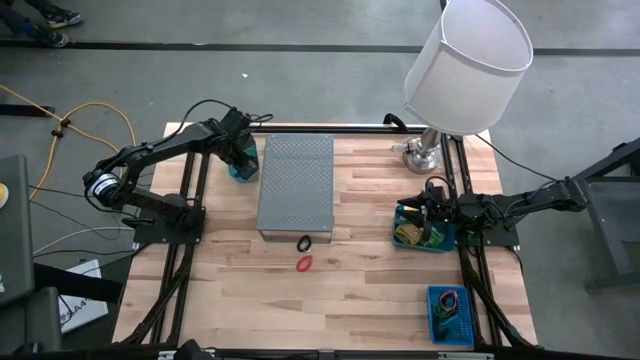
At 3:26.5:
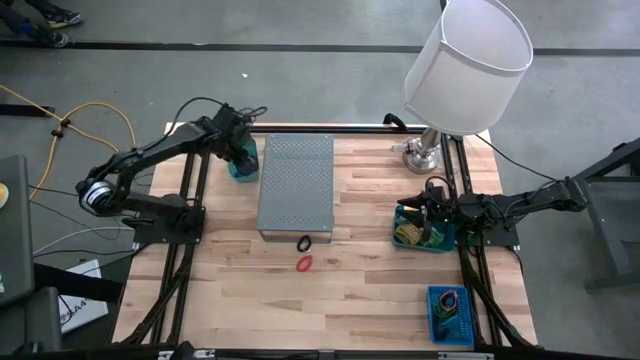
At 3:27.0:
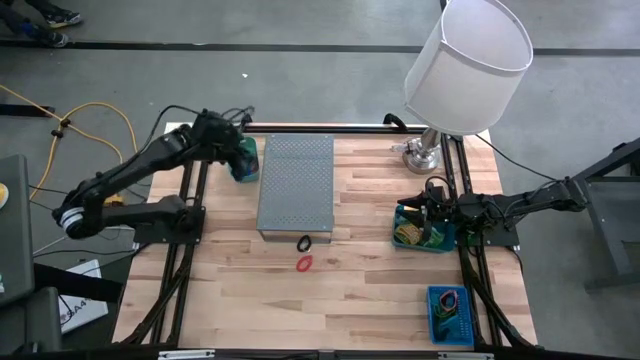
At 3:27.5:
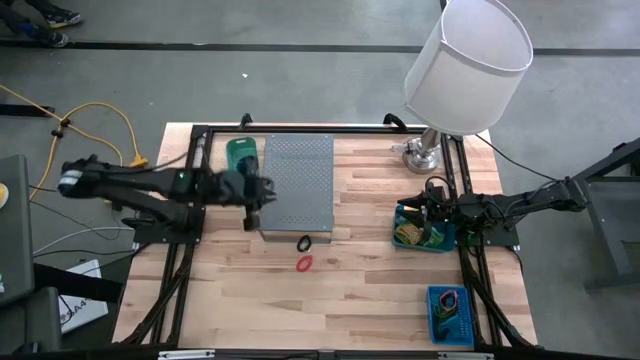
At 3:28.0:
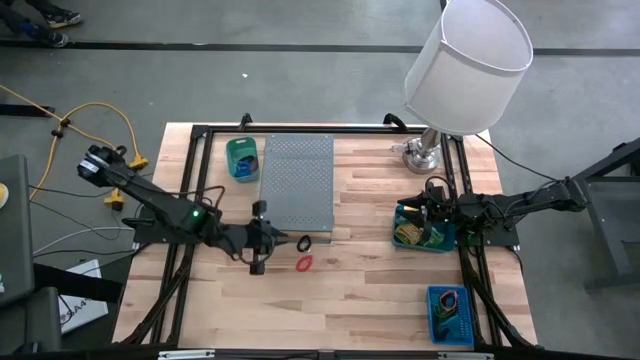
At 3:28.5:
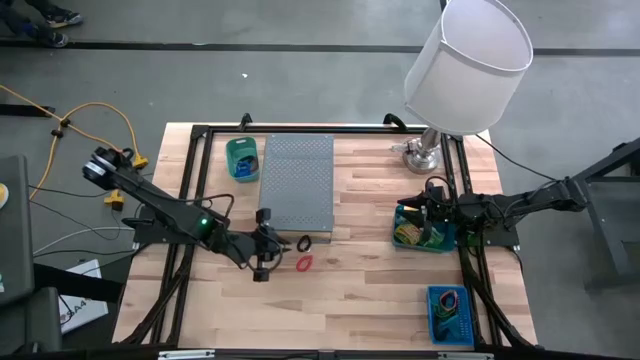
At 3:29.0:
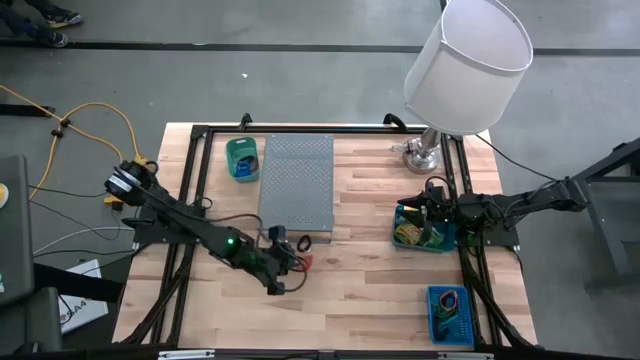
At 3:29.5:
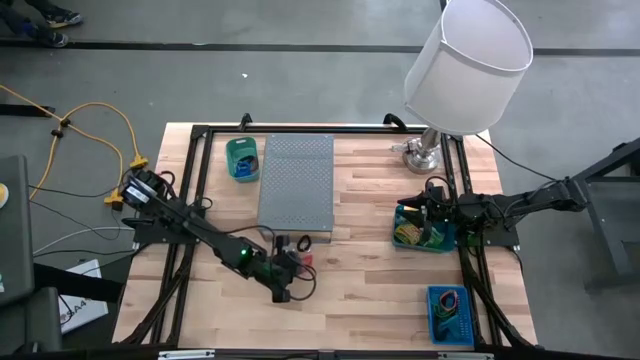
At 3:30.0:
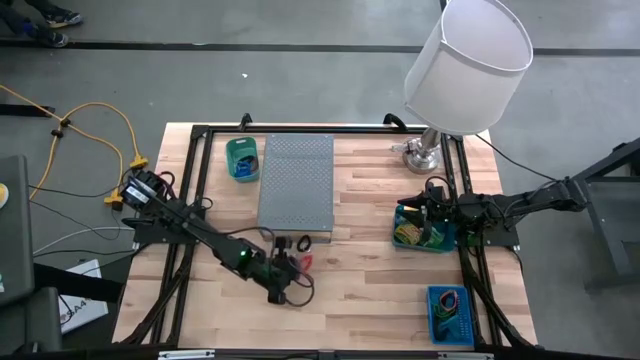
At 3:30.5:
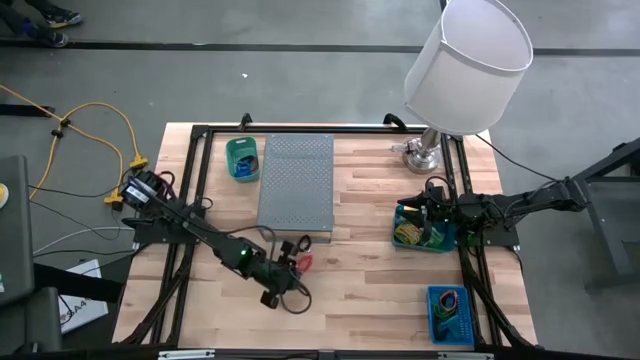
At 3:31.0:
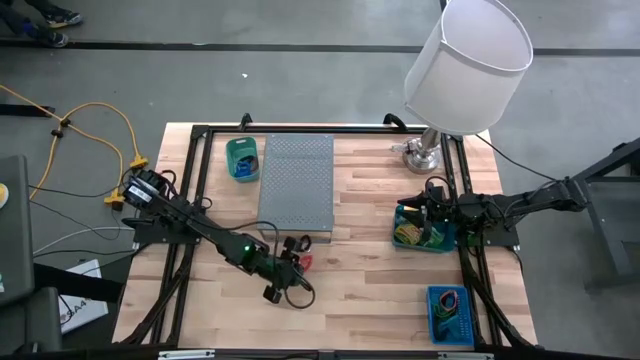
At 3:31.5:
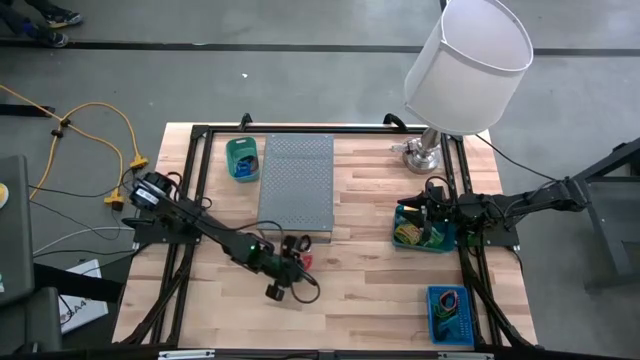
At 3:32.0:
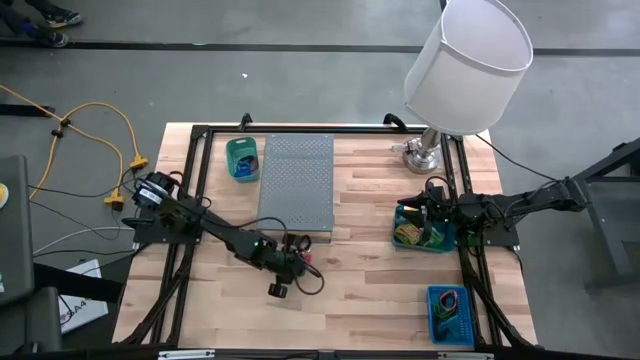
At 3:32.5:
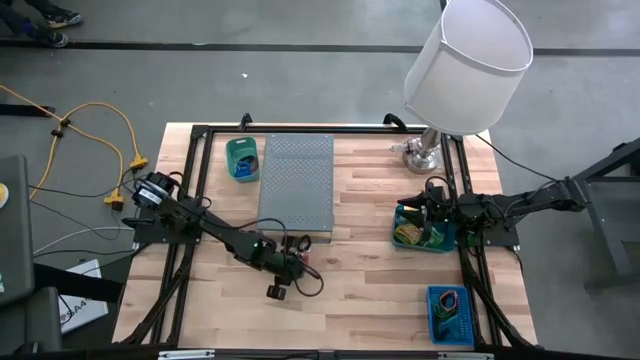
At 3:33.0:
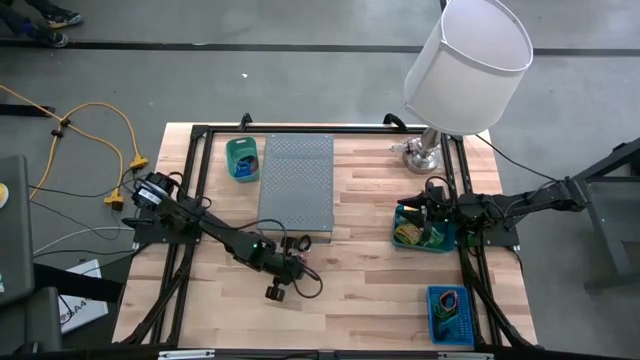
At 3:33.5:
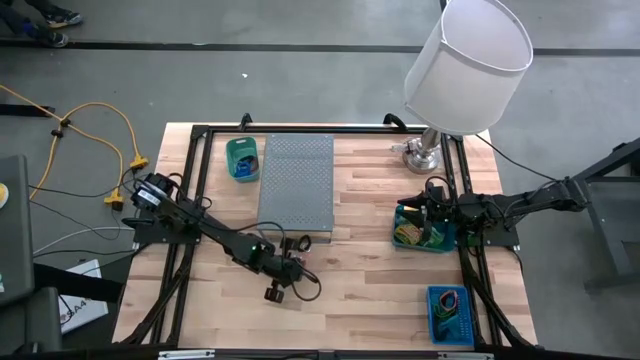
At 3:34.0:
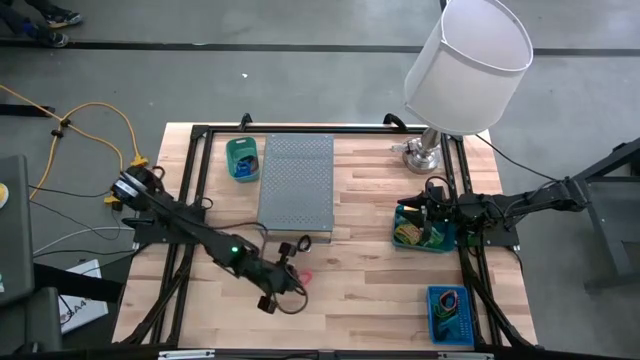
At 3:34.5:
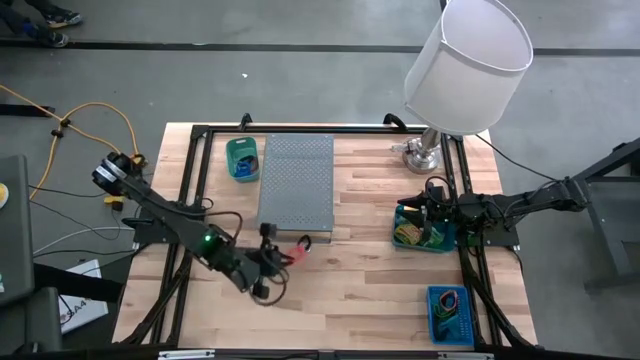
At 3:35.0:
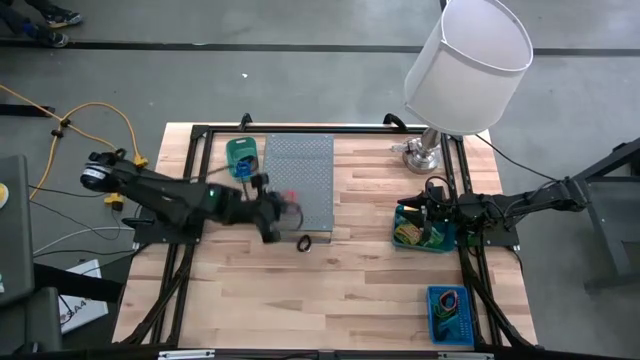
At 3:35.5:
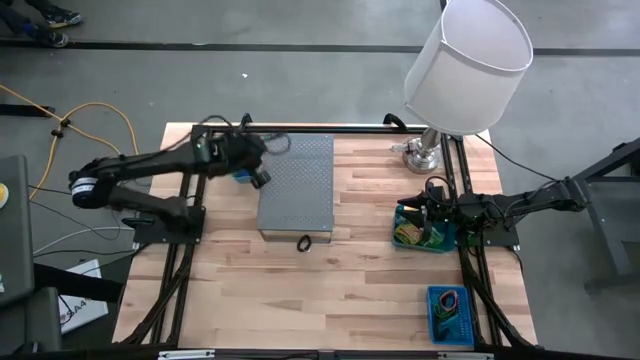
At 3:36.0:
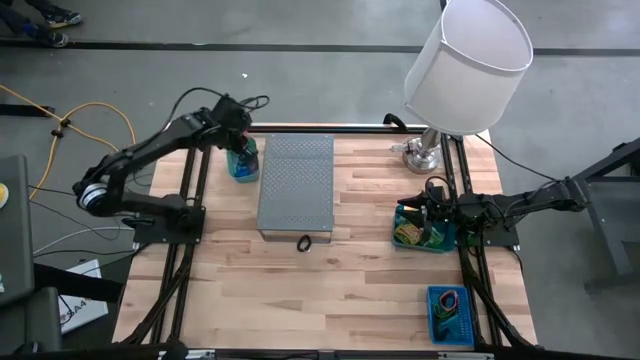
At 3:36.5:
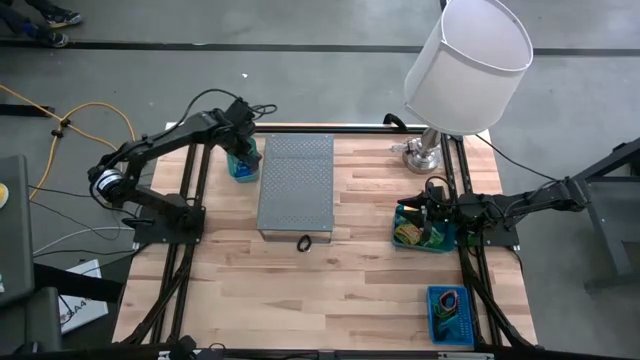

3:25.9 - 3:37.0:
Task: Pick & Place Office Desk Supplies
Put the orange spring keychain into the dark green bin

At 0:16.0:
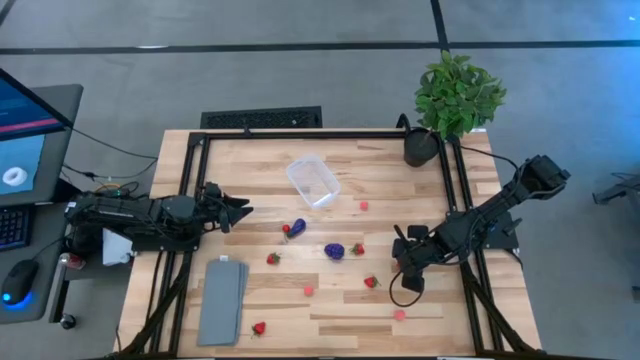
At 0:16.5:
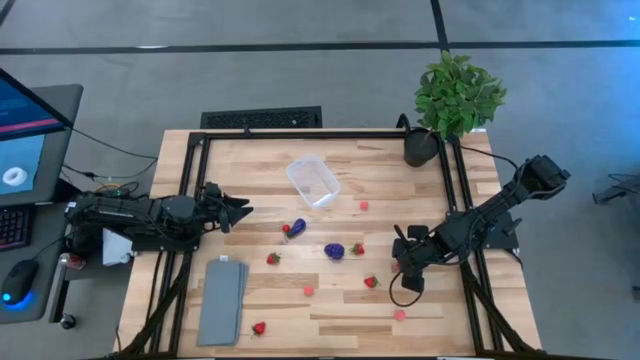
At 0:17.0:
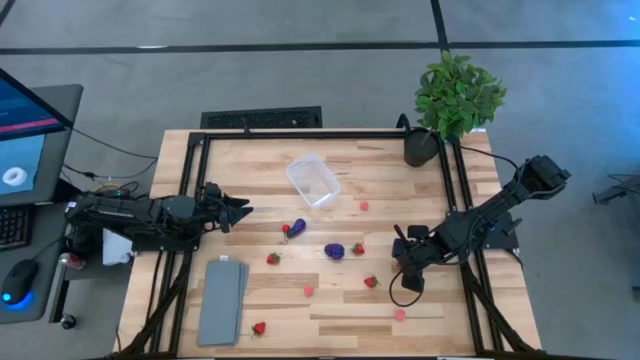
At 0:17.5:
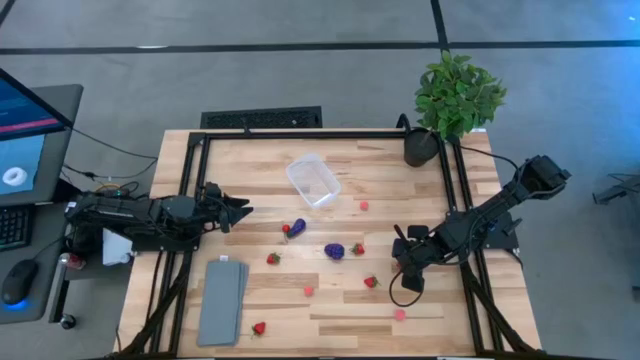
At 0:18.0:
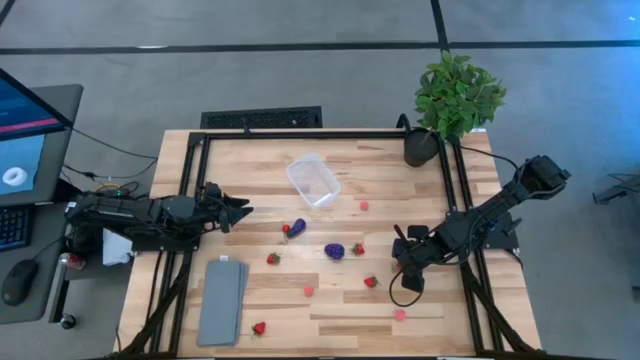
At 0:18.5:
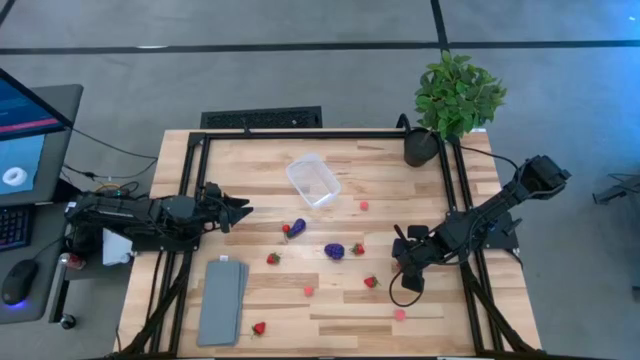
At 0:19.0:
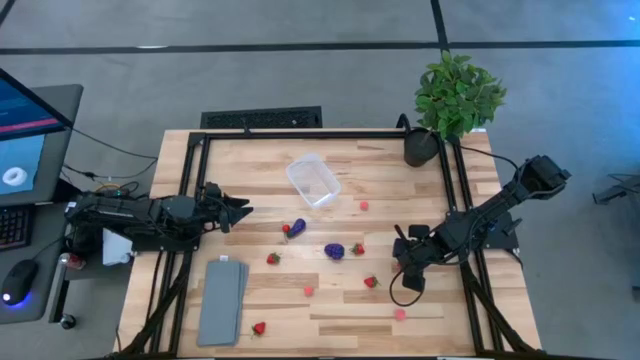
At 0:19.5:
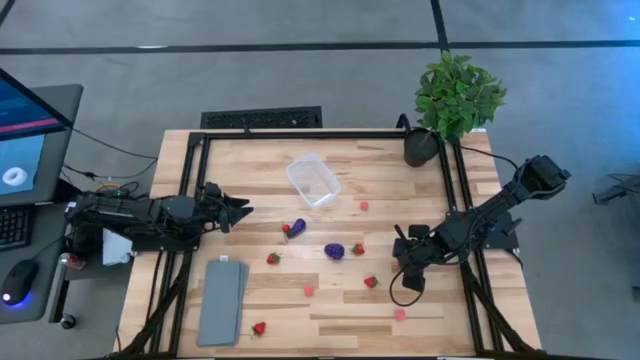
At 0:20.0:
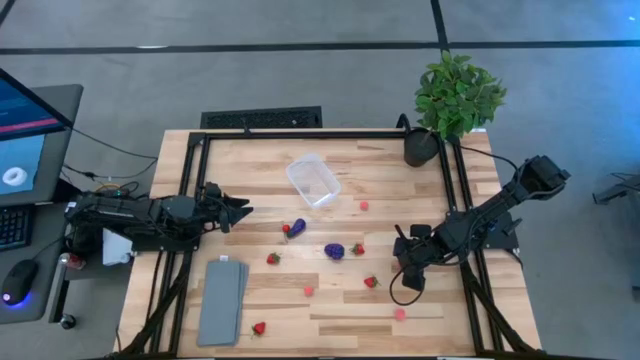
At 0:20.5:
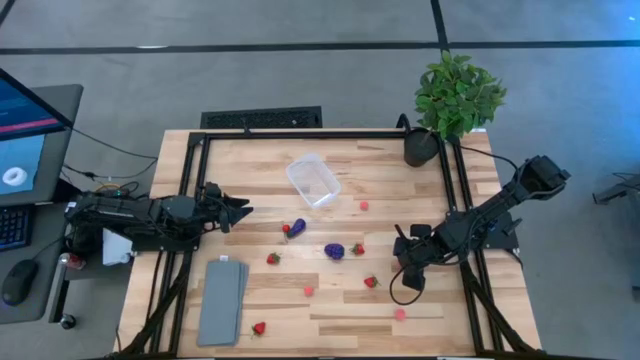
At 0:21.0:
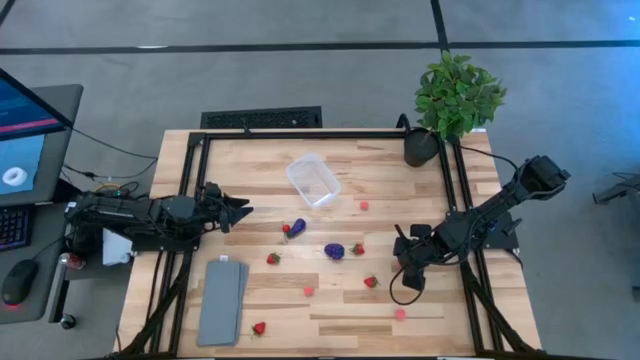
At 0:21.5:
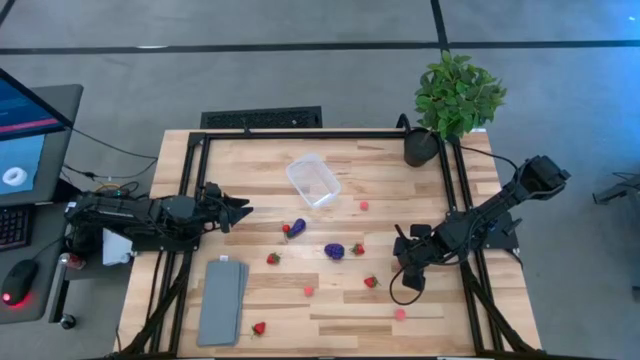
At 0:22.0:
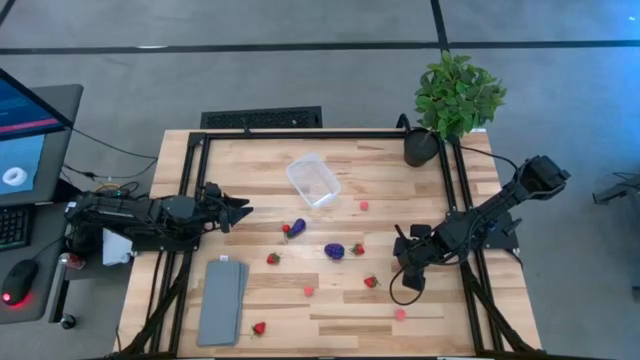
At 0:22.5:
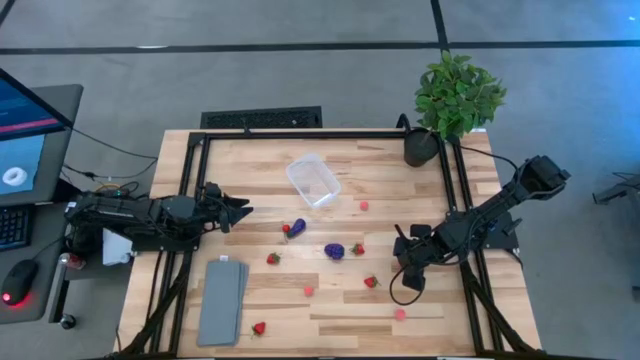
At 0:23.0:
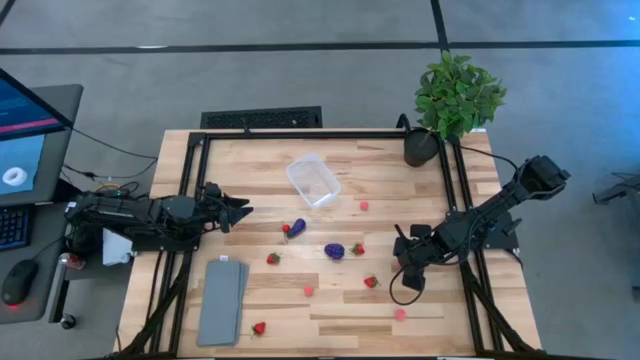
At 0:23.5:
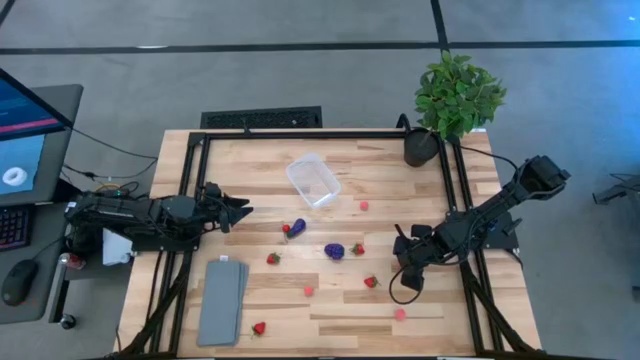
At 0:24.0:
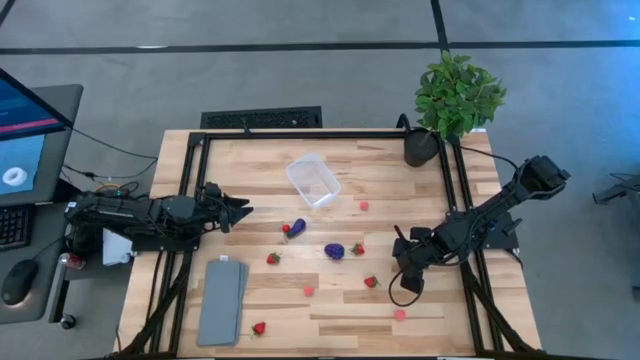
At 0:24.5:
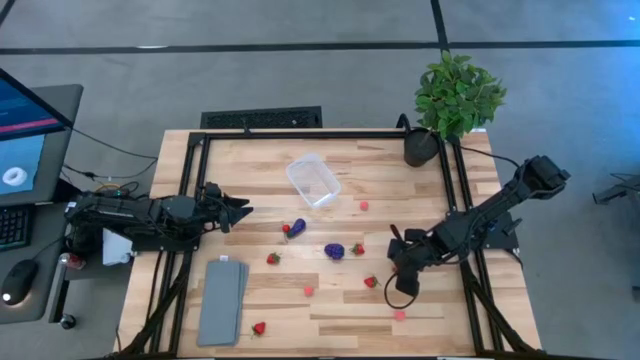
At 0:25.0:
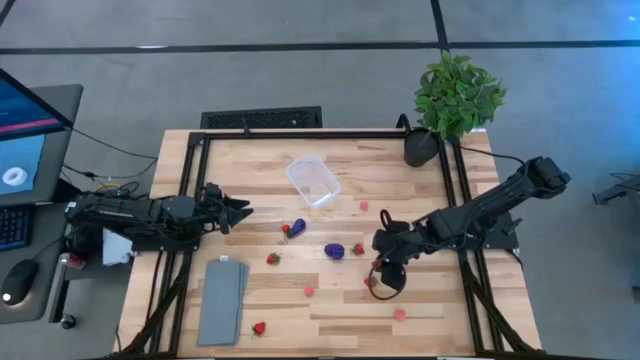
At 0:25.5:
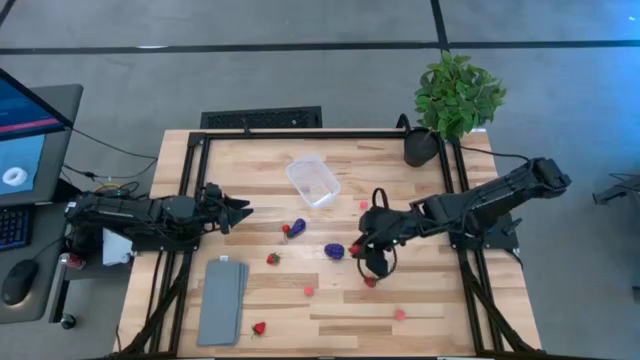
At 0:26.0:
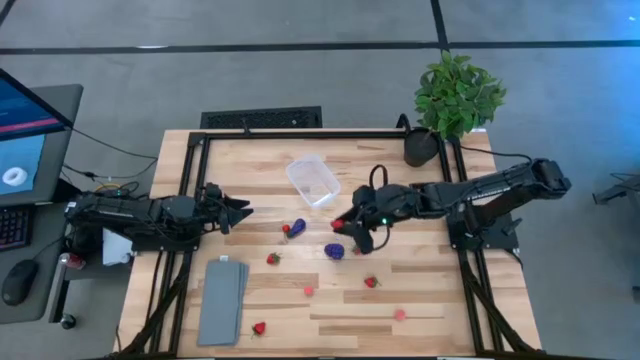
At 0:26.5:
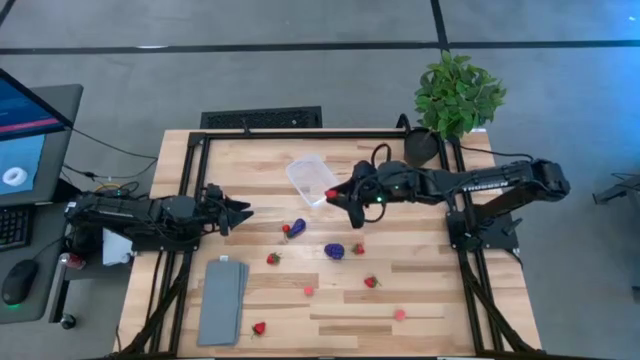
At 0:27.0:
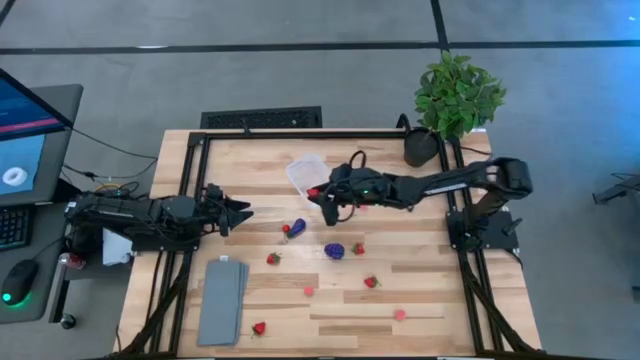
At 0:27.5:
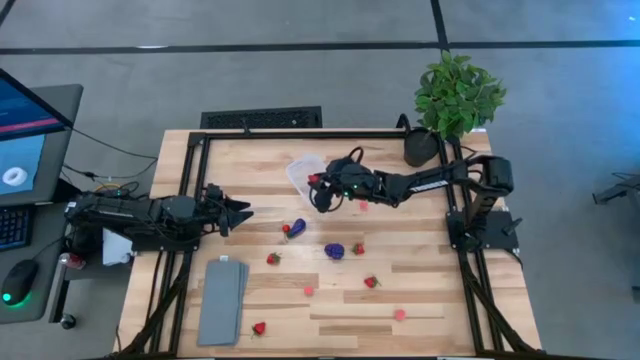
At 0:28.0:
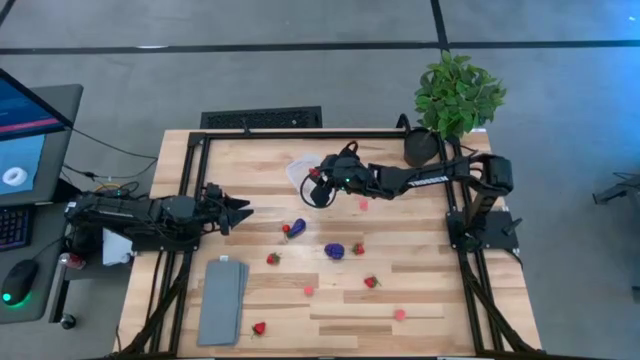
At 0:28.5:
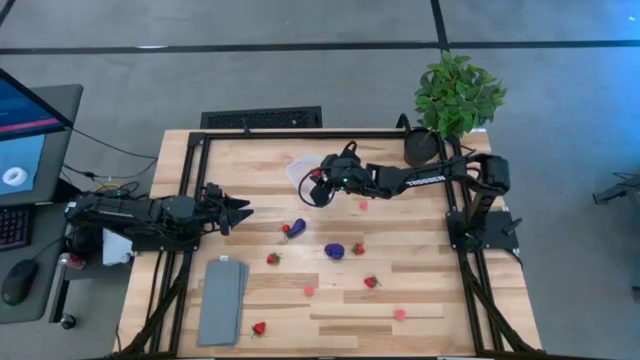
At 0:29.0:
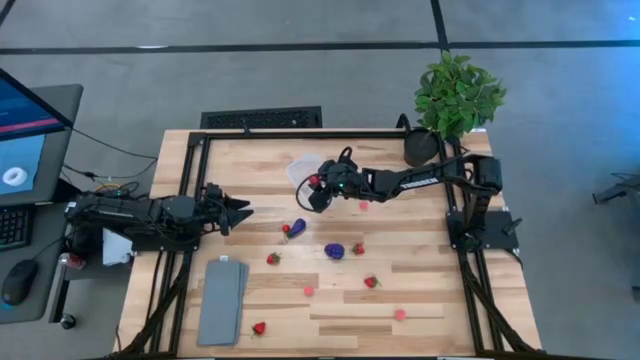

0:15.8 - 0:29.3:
Task: Pick and placing Produce into tupperware
Put the strawberry into the transparent container
